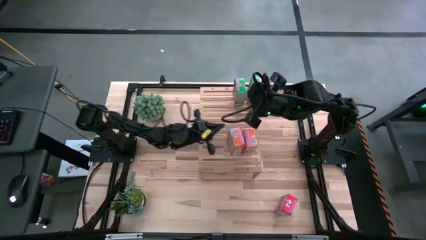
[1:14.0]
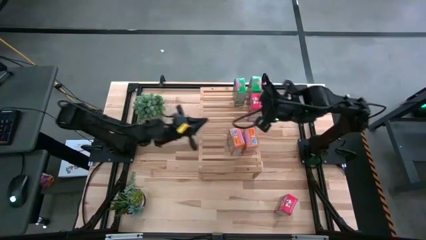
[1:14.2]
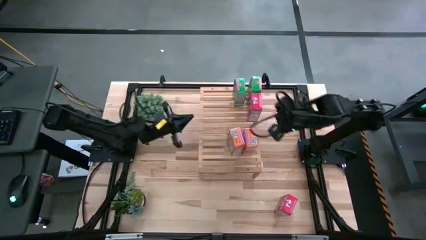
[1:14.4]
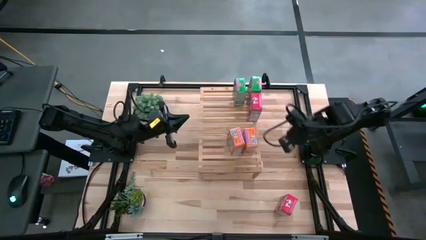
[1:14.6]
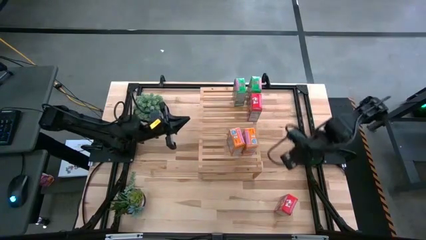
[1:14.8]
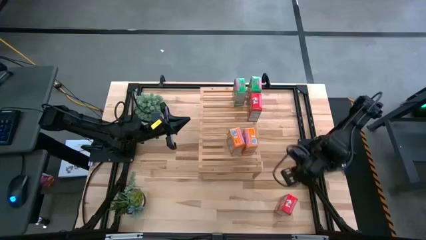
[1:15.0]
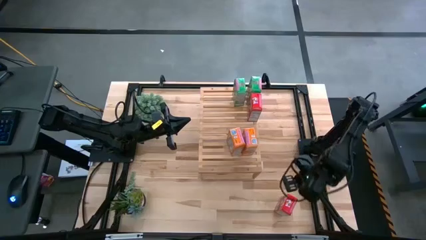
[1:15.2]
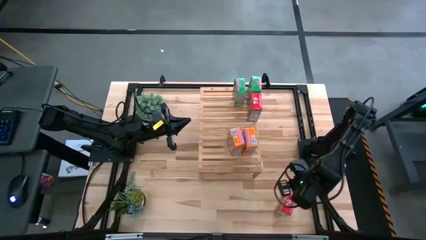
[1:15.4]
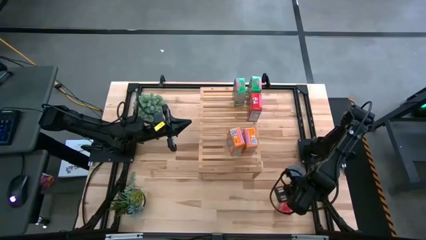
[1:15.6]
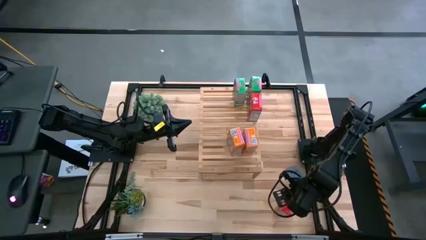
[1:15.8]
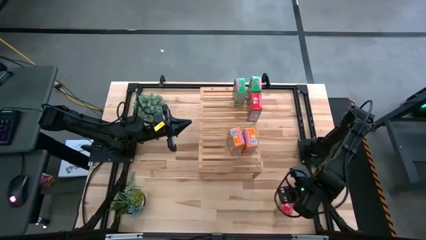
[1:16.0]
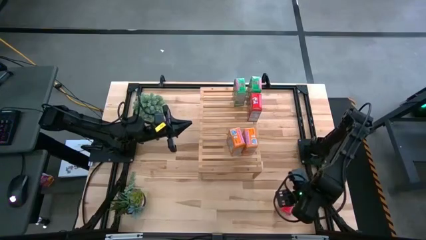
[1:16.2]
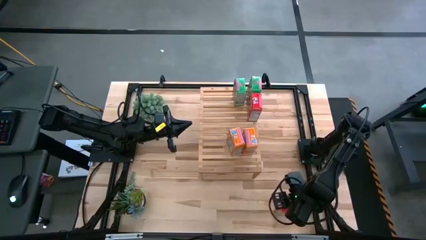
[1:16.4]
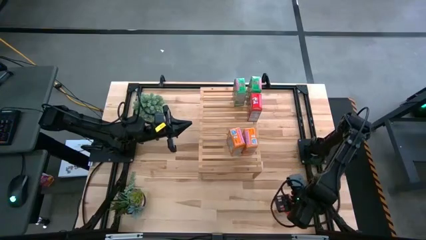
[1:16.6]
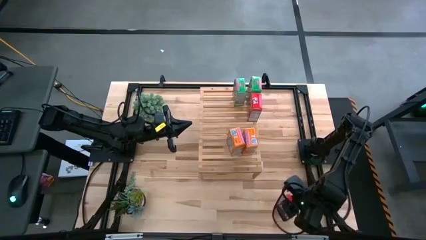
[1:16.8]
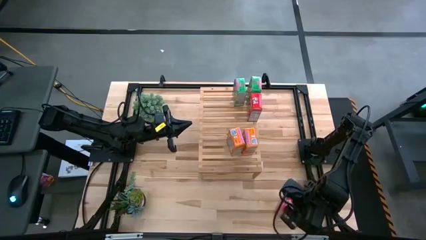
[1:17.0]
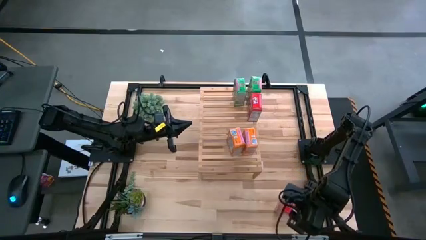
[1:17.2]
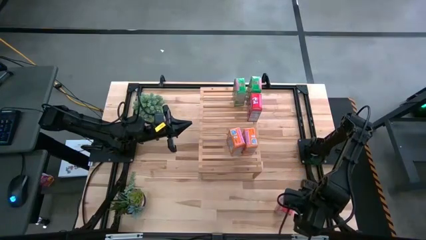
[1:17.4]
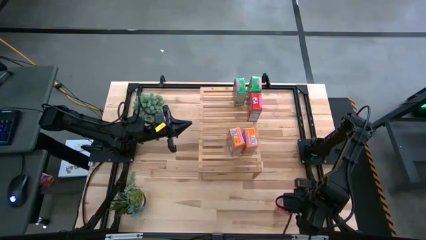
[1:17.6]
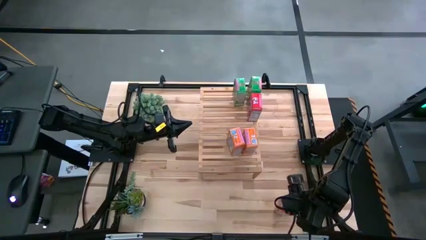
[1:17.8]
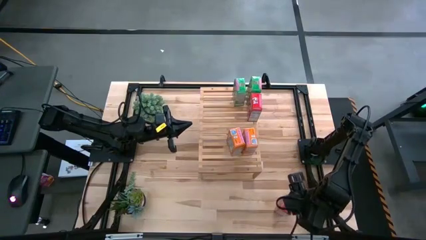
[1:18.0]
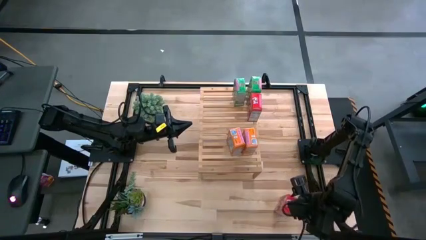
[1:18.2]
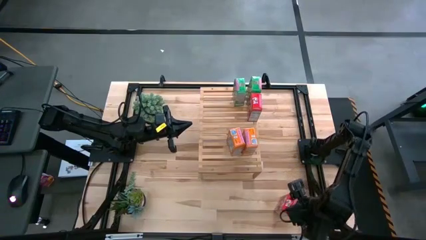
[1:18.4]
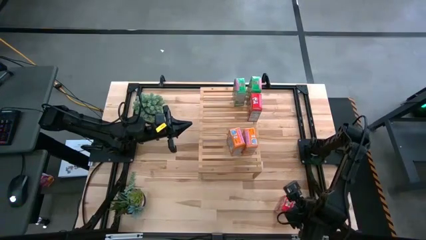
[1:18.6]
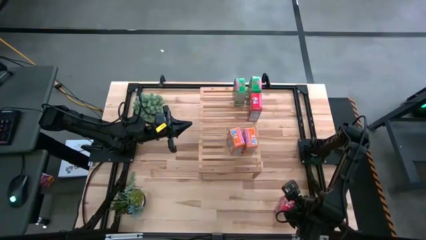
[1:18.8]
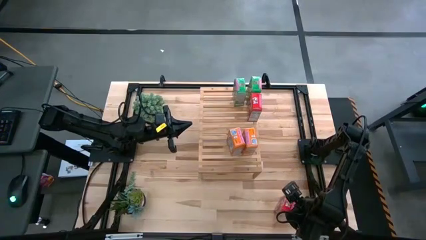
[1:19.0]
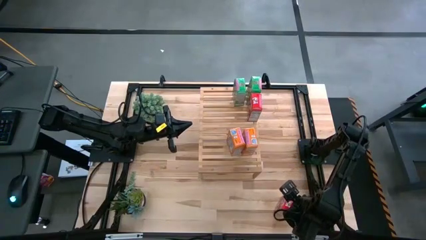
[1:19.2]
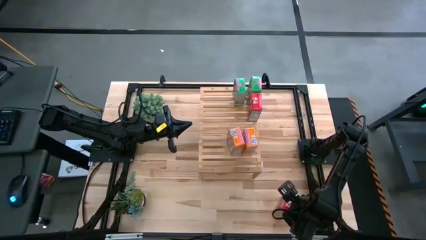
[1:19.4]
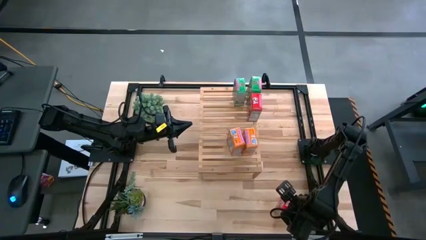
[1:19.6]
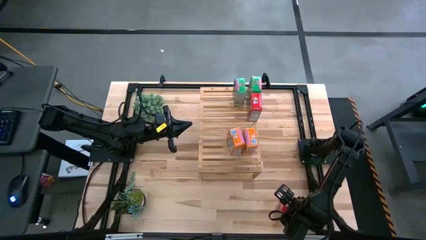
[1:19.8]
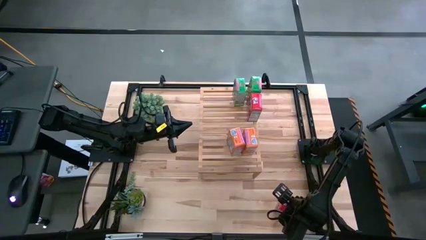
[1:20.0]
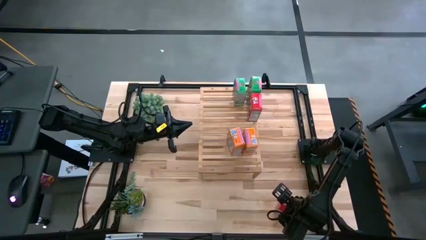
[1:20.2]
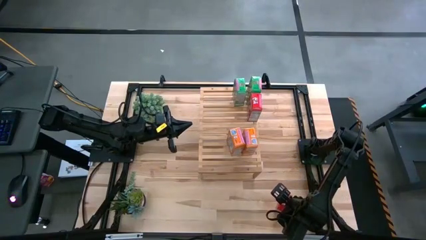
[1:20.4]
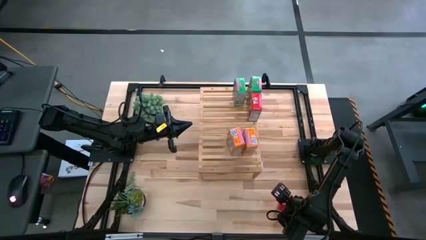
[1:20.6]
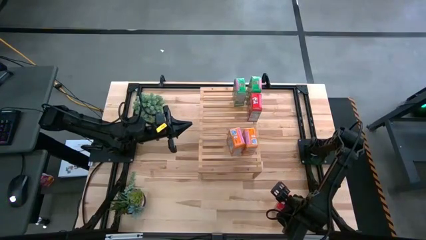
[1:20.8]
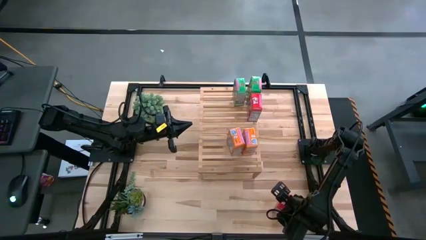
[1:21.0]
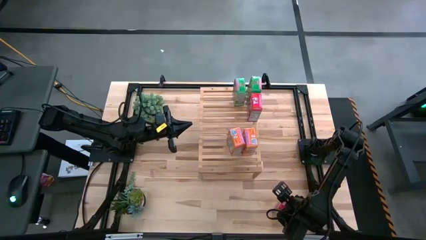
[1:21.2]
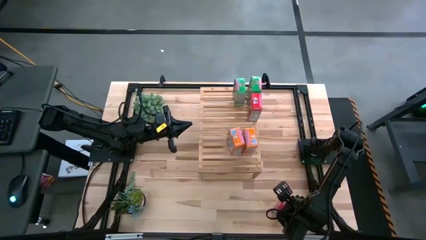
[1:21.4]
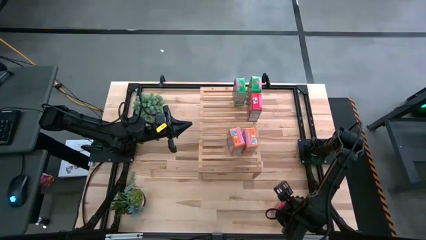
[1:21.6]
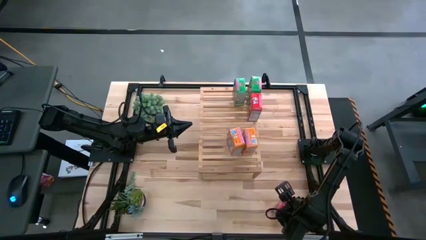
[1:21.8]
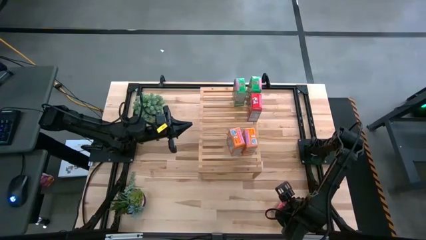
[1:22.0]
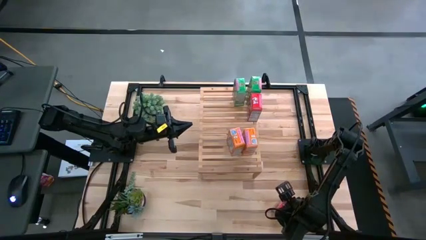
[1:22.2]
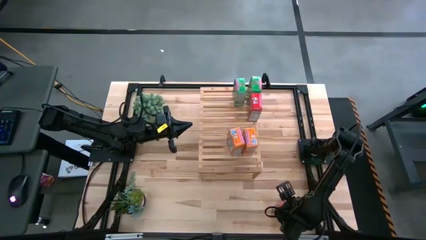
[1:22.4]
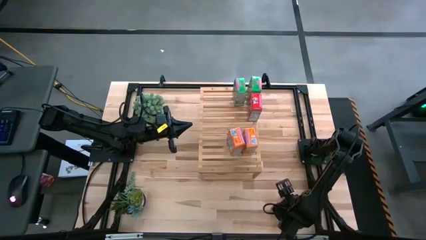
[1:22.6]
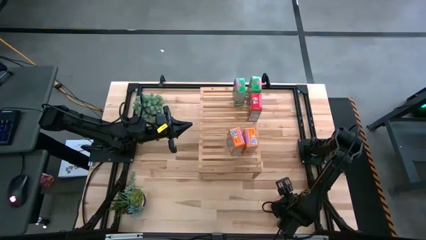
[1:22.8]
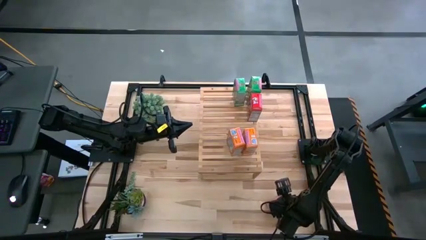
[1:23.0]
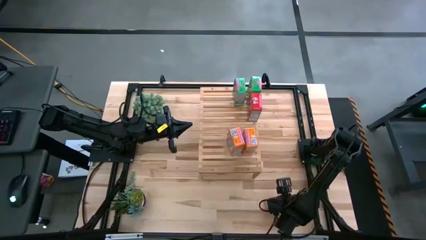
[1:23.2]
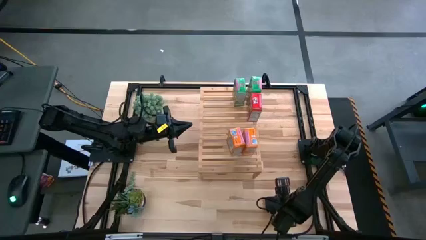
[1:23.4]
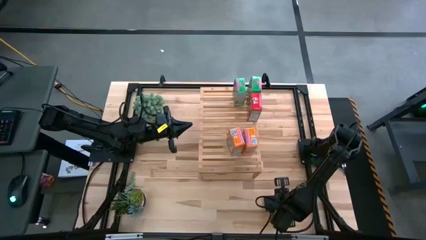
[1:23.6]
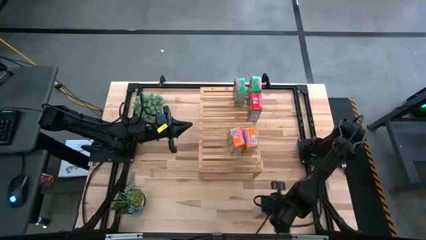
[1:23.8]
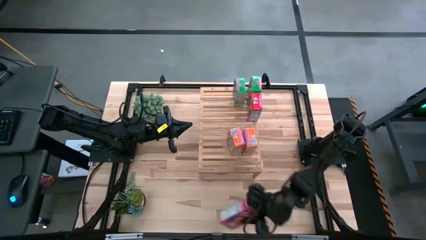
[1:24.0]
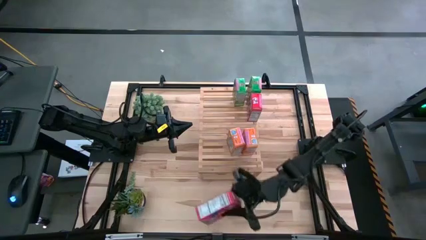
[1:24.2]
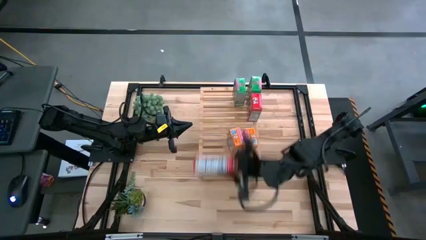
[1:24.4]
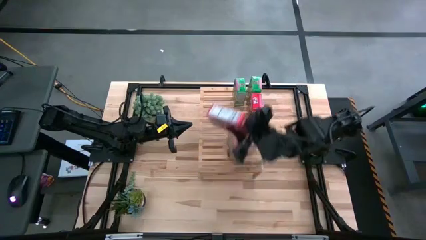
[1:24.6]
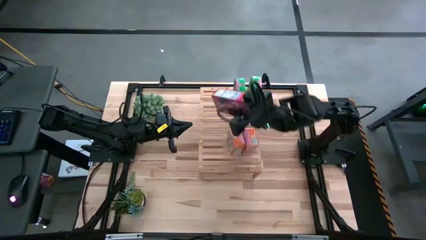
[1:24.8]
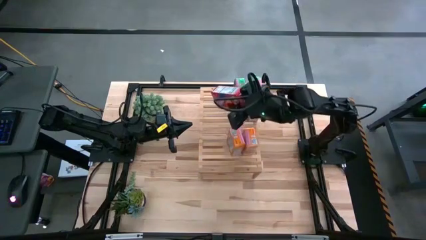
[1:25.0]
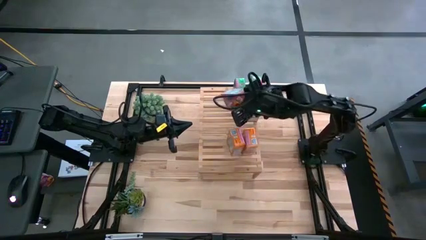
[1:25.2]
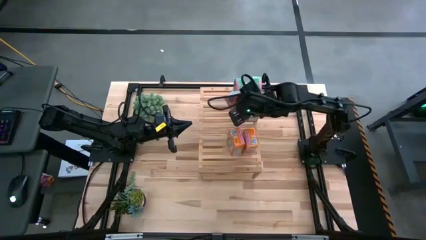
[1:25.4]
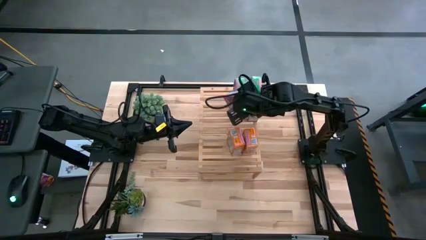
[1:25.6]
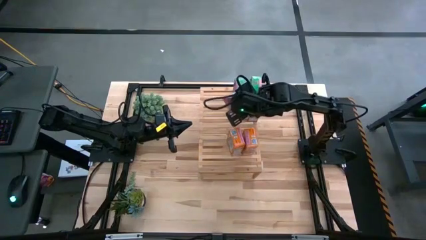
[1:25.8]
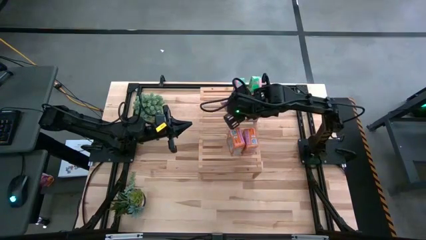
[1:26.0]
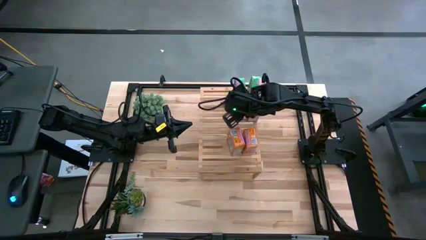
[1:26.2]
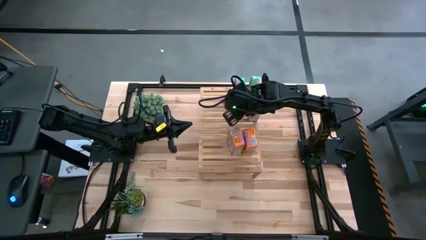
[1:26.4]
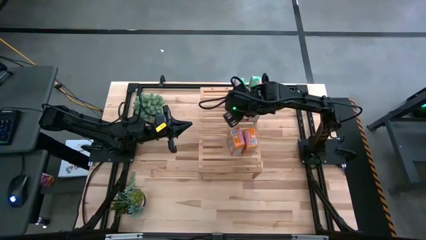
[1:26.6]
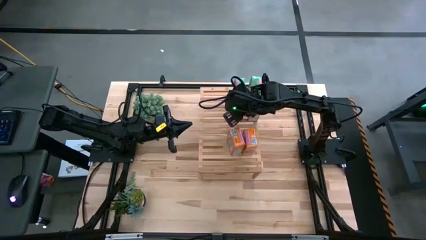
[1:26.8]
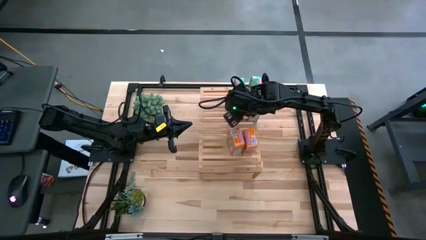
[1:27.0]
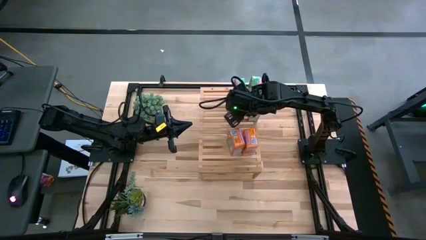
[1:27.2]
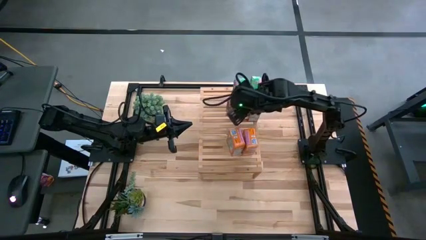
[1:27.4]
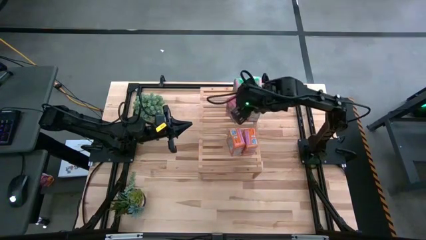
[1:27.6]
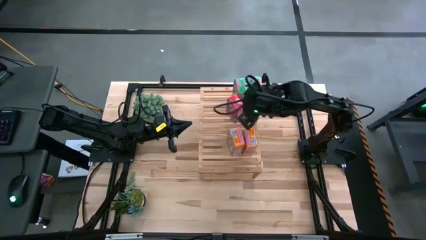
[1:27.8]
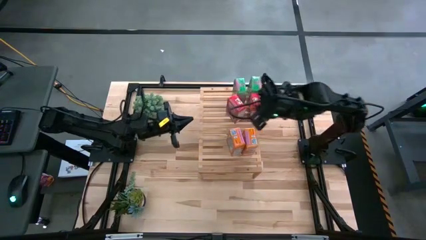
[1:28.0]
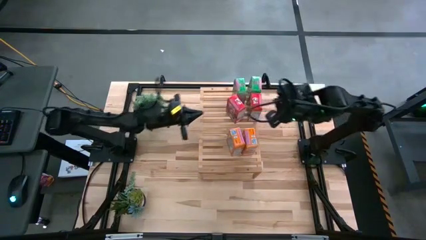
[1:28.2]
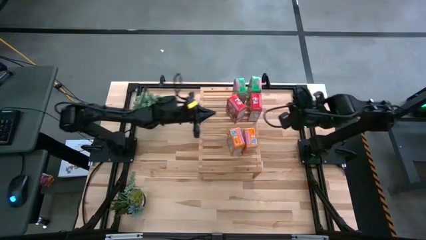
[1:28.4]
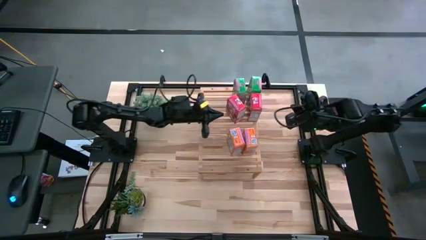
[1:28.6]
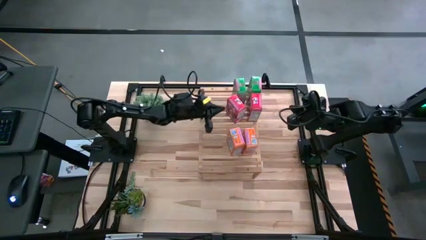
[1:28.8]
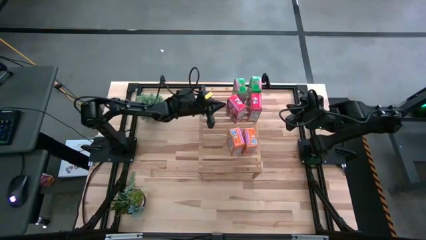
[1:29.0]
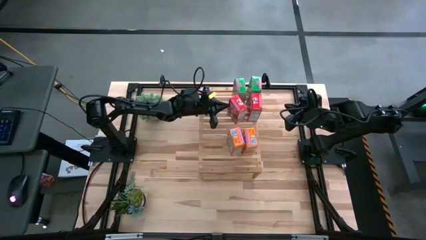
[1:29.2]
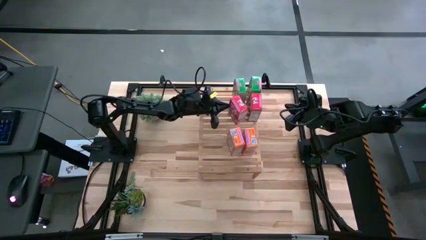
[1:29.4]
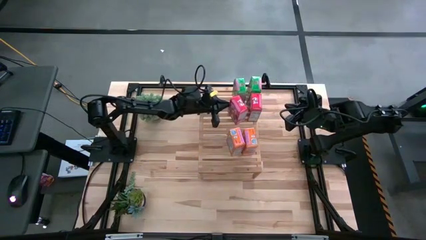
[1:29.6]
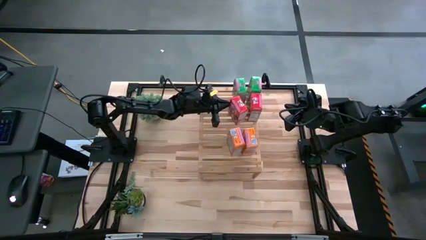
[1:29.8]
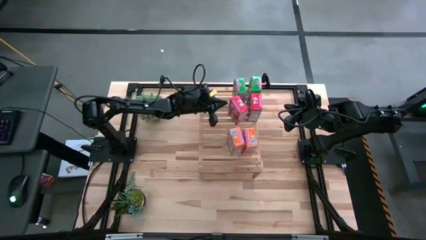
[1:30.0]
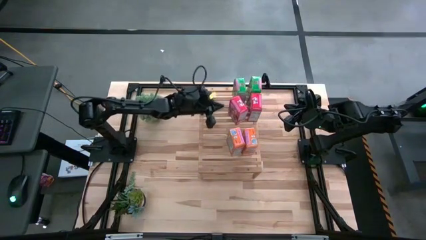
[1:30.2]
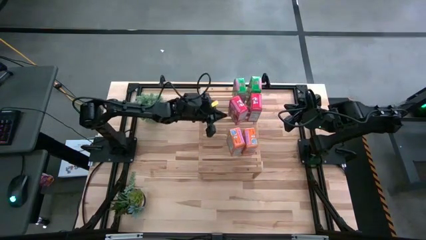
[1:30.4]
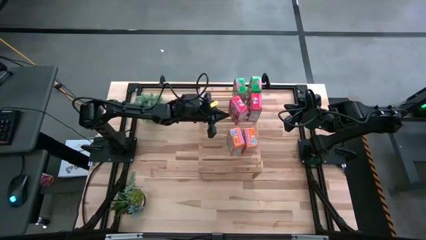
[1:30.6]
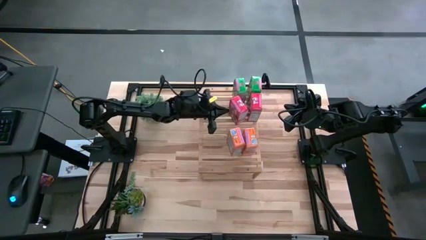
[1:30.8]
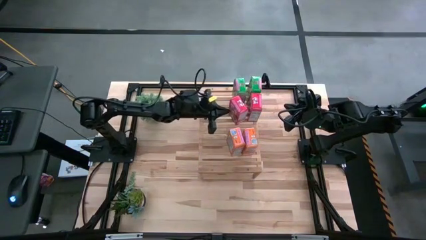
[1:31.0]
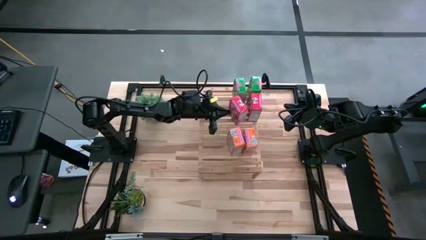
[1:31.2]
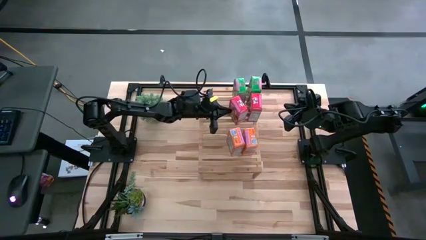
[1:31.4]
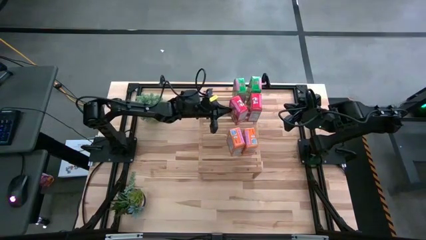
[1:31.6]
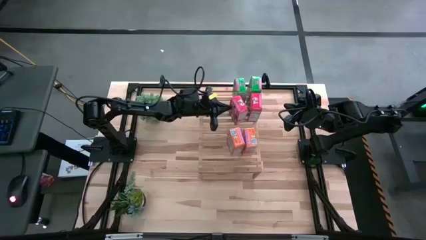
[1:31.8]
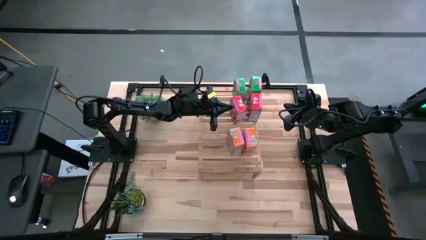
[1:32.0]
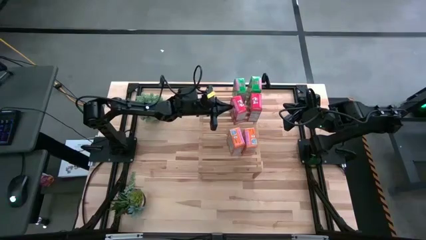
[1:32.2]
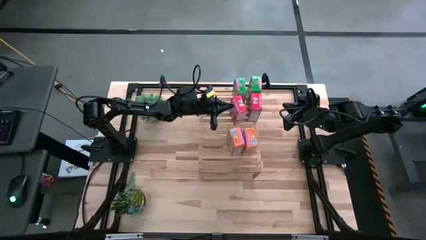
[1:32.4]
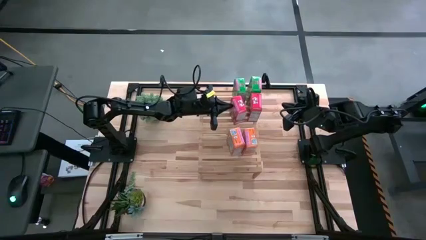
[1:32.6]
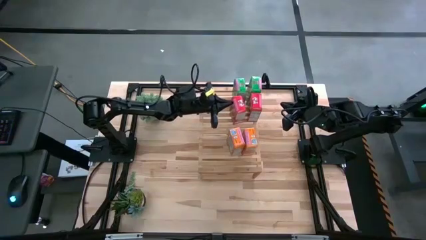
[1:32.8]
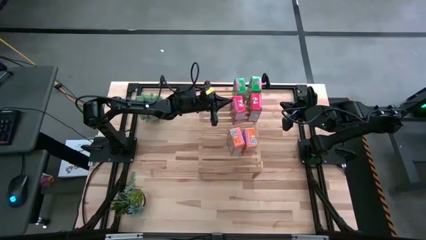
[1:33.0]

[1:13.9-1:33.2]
Task: Stack cereal on shelf
Put the red cereal box on the shelf aligned with the other red cereal box
